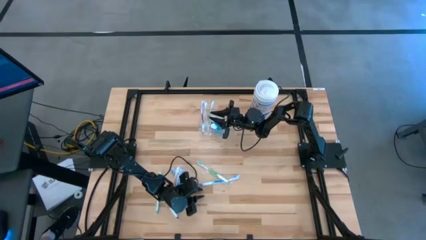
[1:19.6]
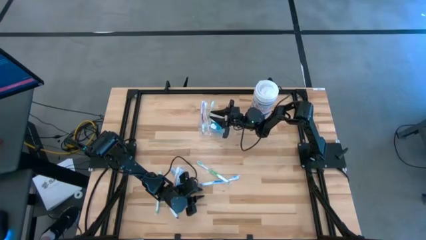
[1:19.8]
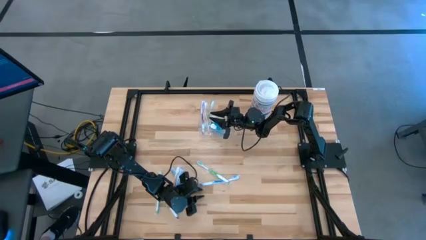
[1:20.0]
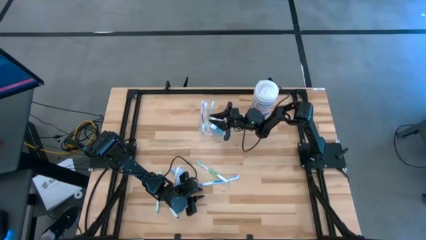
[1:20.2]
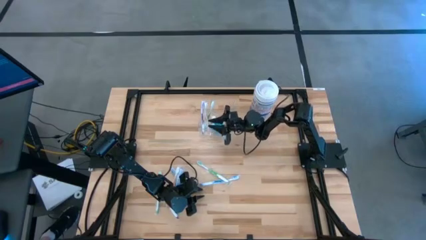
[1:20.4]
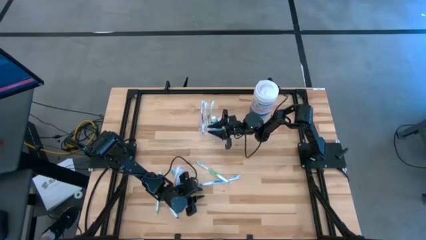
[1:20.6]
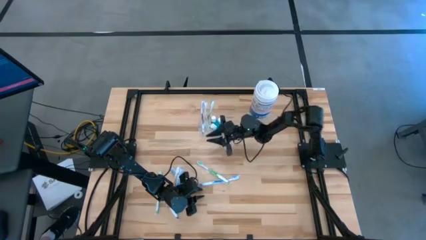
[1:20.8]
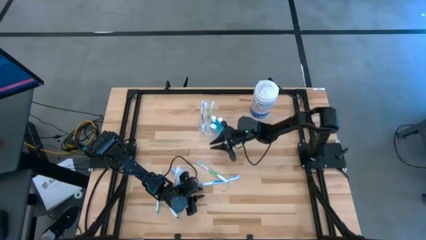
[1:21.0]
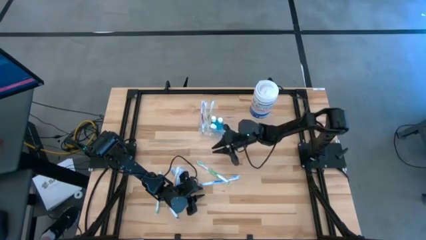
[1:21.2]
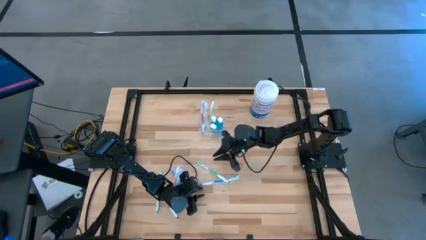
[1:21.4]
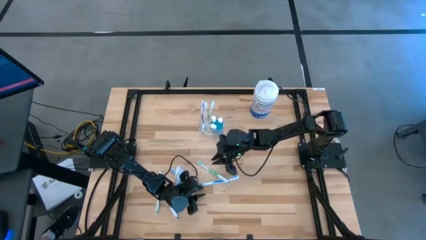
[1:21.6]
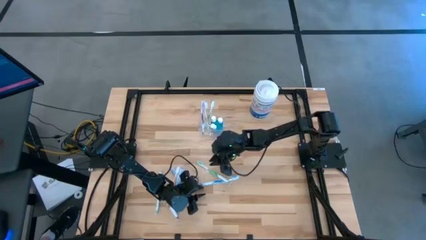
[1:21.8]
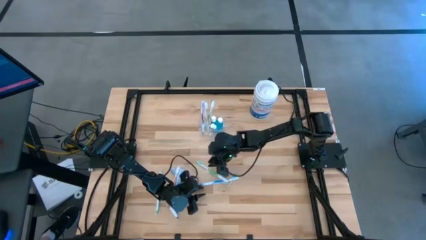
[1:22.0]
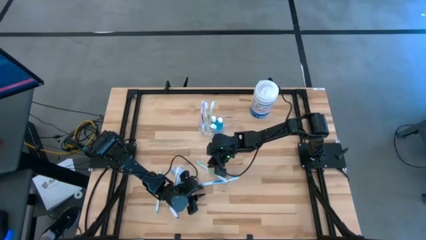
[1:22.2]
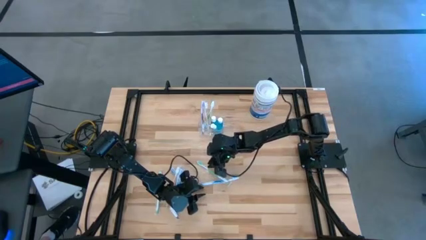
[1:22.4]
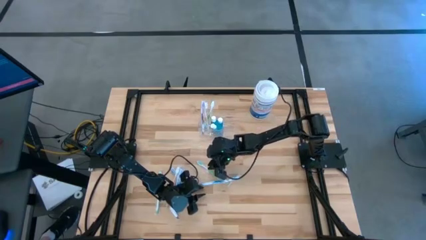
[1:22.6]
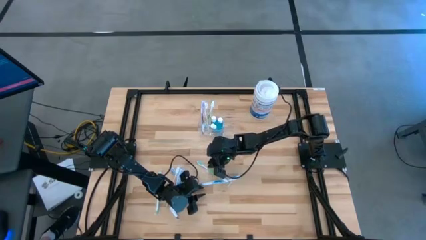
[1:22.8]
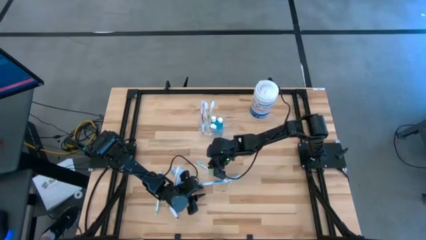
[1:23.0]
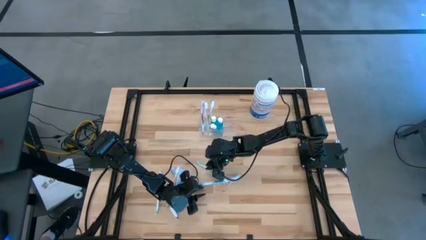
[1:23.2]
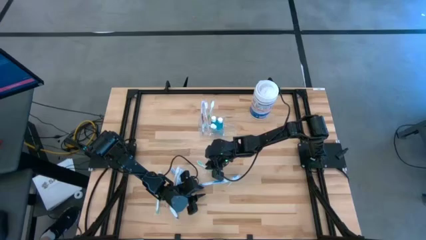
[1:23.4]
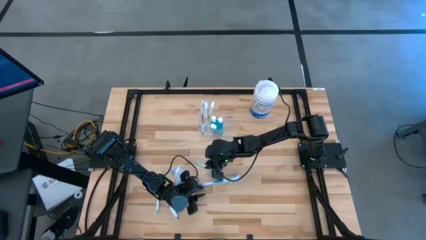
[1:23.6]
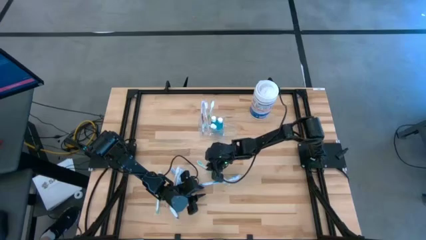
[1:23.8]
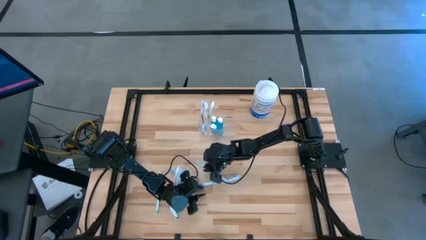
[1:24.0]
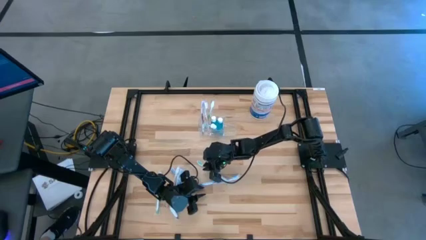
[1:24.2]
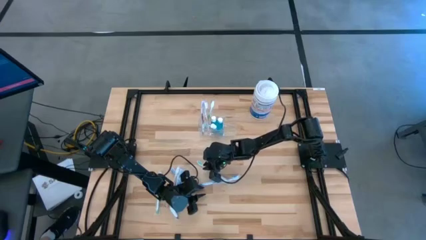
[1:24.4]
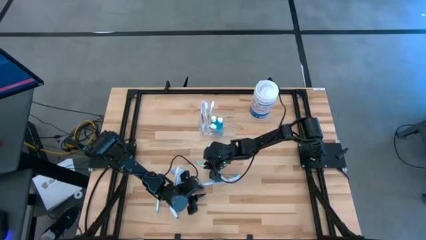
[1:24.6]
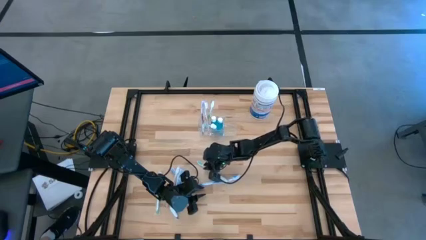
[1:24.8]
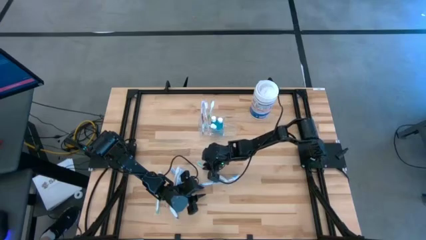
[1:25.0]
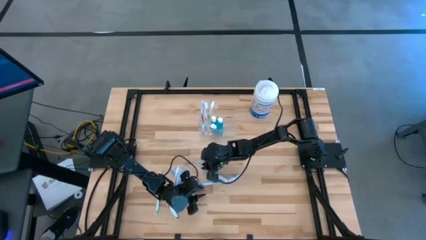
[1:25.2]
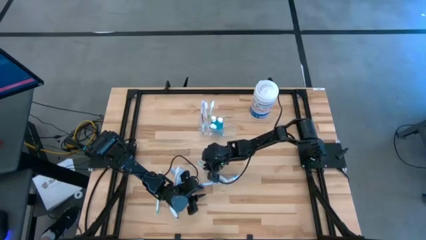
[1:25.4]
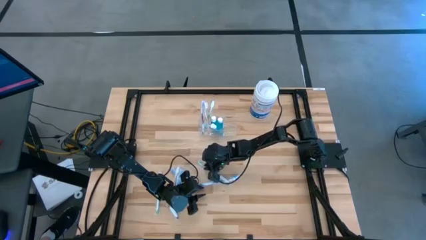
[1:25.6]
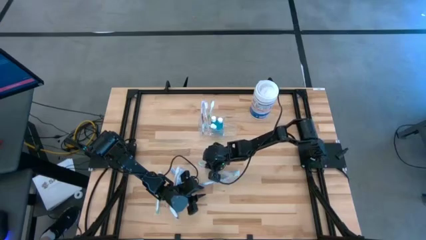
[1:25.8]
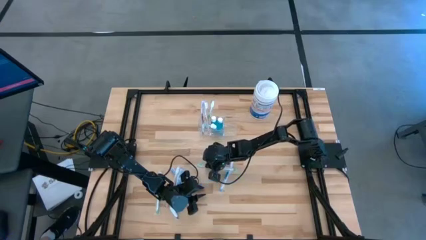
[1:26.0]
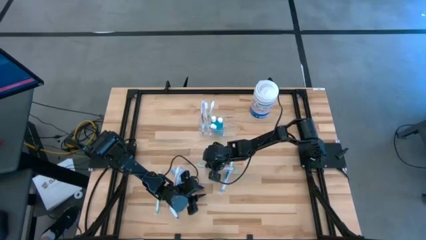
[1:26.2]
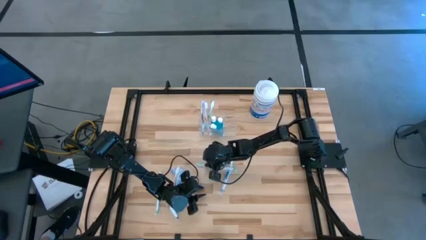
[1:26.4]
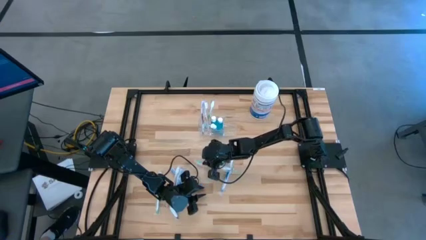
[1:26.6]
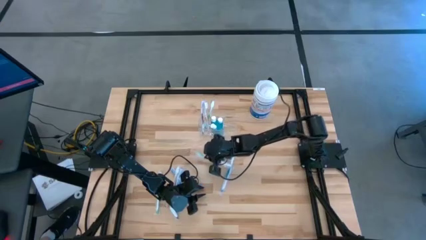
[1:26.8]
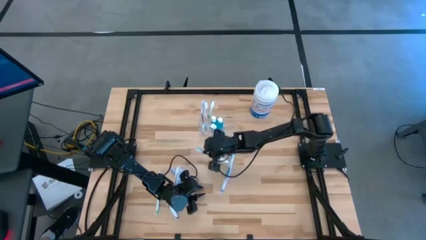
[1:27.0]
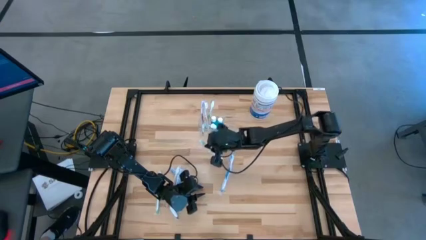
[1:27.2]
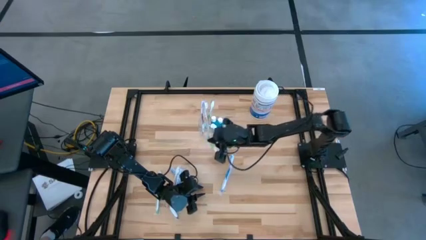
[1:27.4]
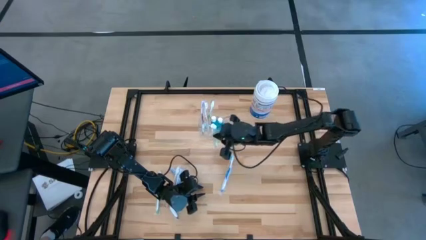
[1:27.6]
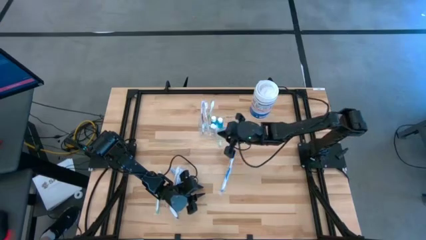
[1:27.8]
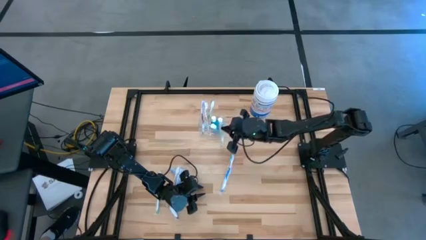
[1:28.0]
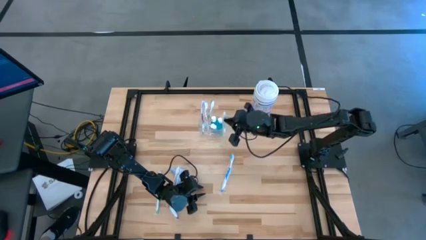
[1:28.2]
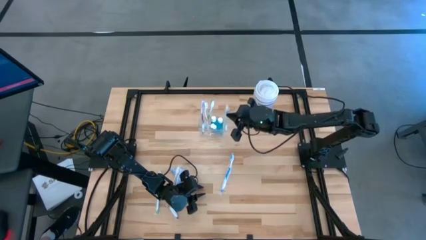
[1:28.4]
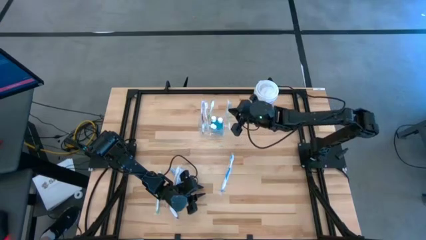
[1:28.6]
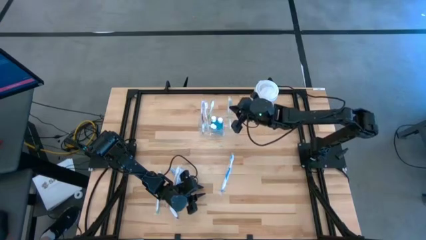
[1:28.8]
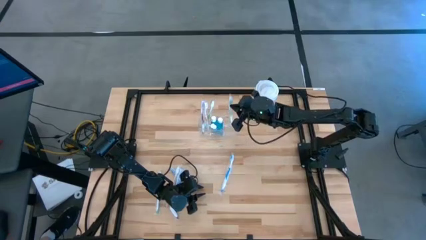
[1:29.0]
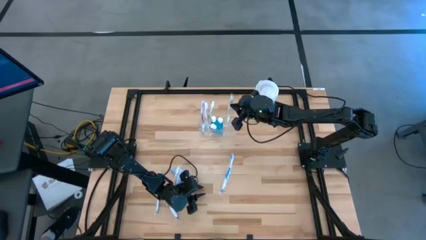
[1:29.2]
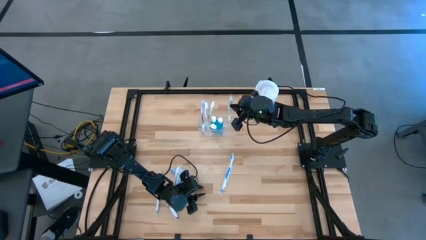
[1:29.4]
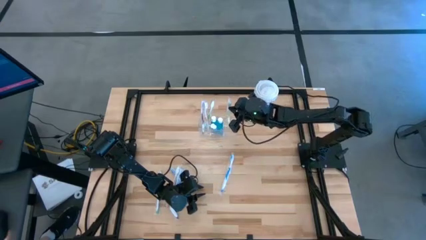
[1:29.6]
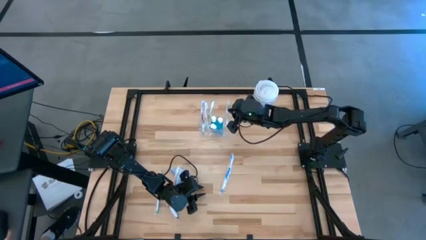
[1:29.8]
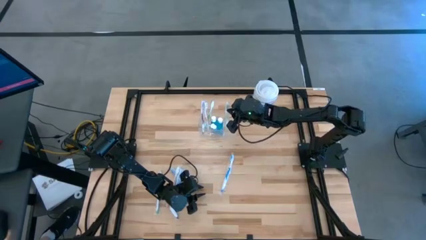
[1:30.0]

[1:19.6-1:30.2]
Task: Pick & Place toothbrushing station
Put the top green toothbrush into the transparent organizer

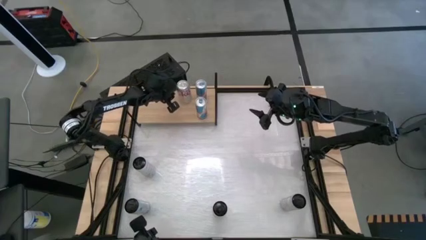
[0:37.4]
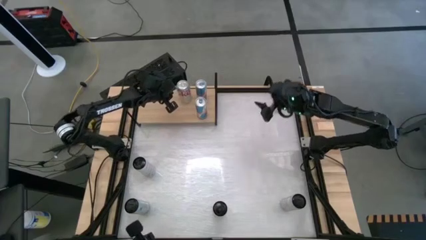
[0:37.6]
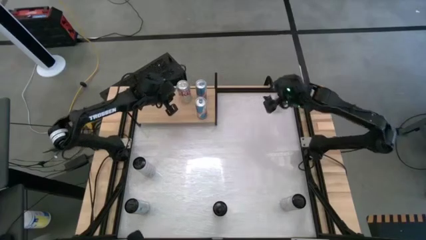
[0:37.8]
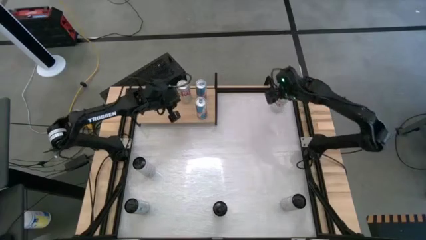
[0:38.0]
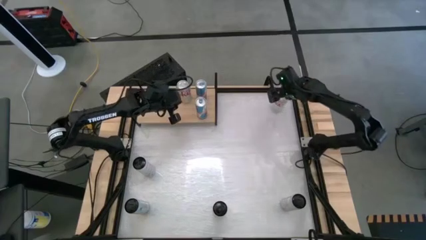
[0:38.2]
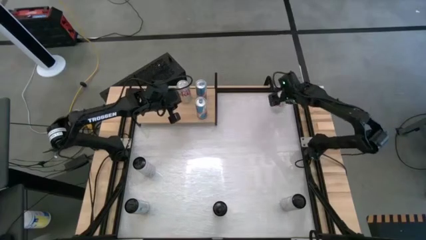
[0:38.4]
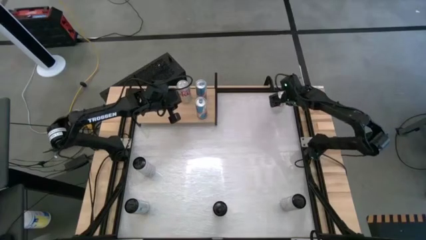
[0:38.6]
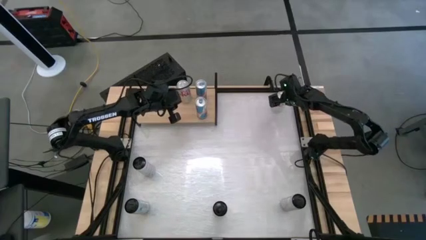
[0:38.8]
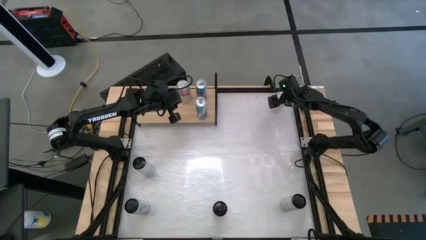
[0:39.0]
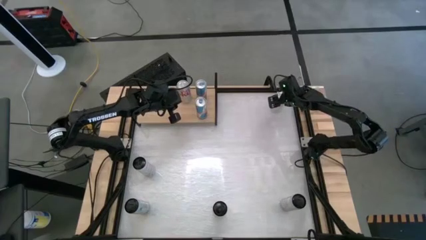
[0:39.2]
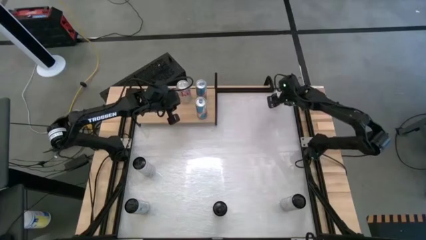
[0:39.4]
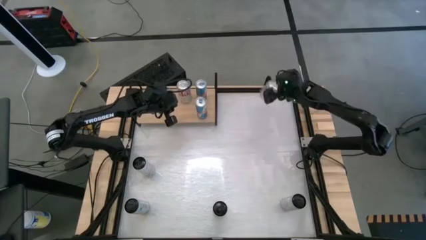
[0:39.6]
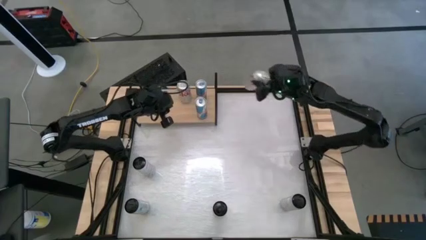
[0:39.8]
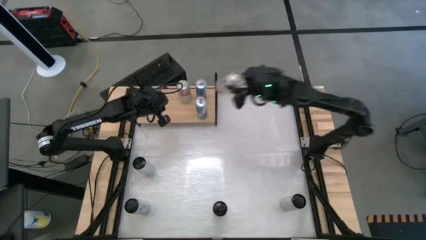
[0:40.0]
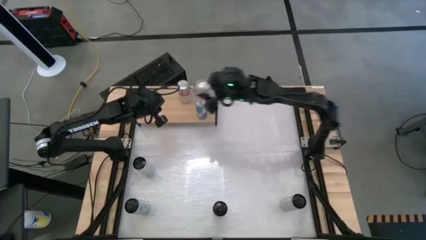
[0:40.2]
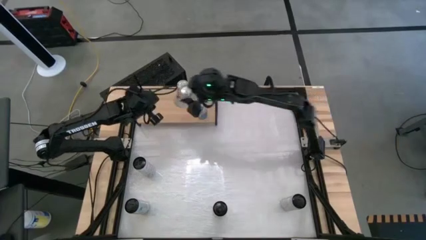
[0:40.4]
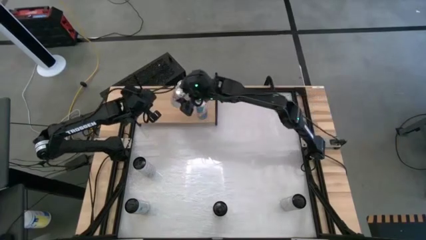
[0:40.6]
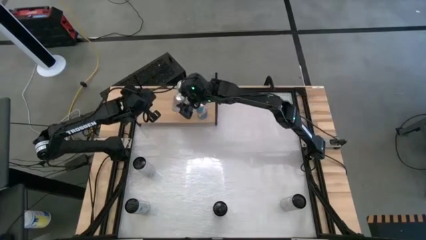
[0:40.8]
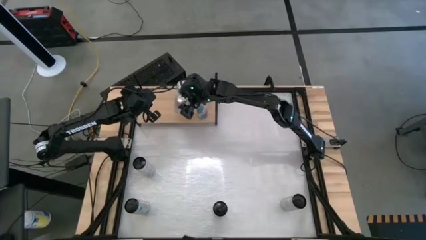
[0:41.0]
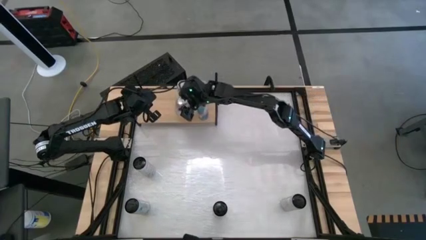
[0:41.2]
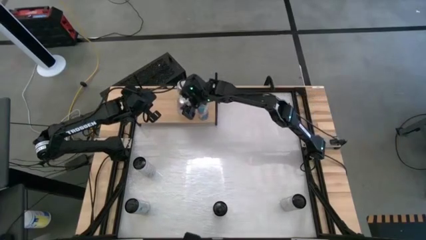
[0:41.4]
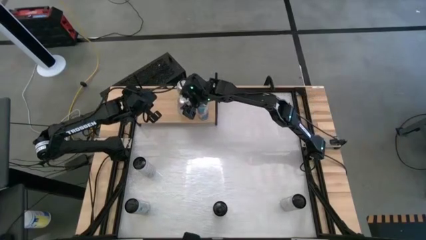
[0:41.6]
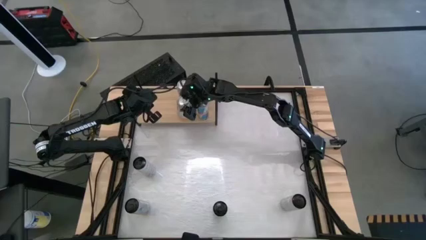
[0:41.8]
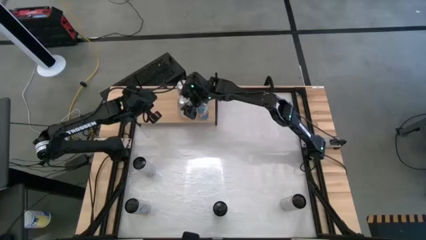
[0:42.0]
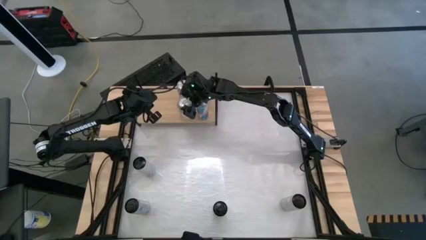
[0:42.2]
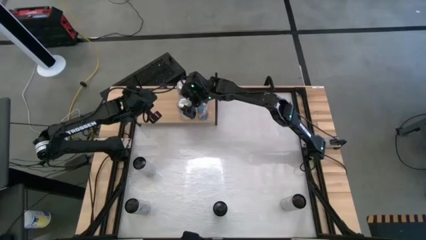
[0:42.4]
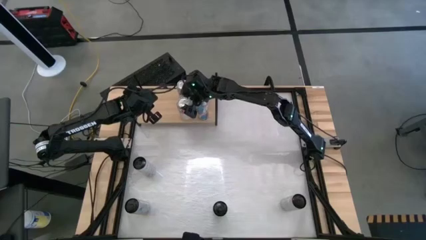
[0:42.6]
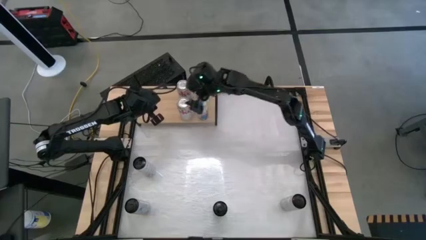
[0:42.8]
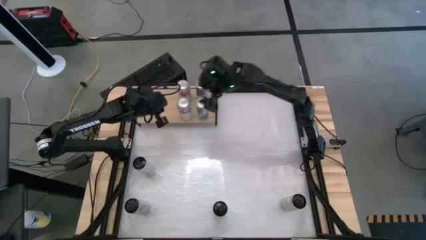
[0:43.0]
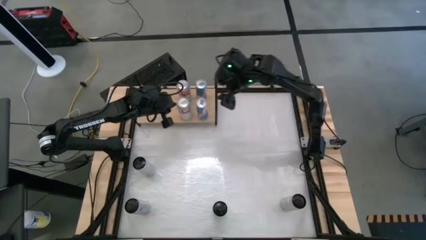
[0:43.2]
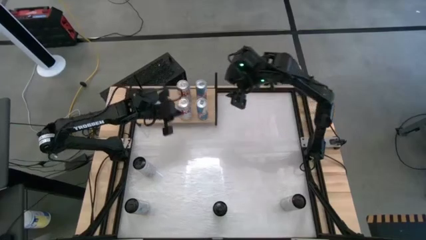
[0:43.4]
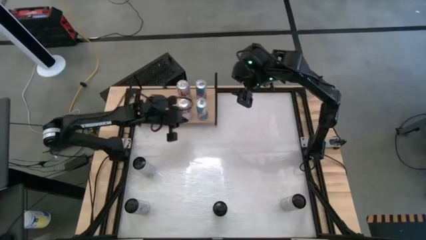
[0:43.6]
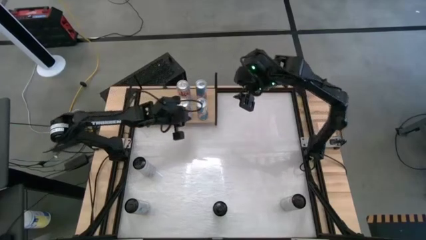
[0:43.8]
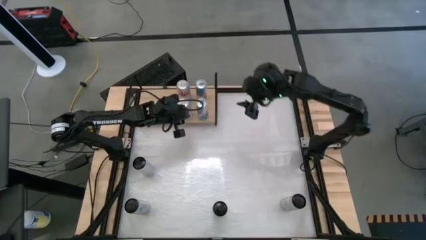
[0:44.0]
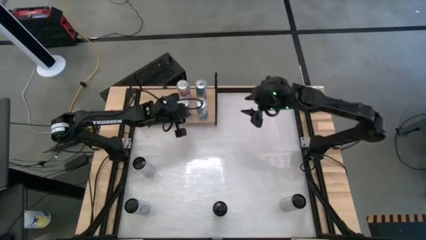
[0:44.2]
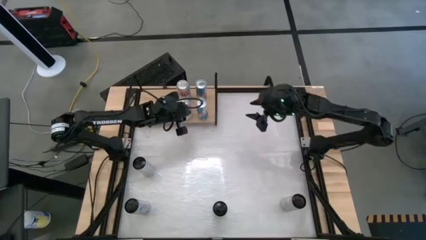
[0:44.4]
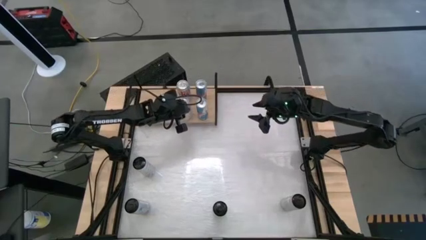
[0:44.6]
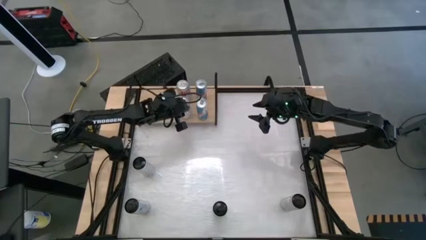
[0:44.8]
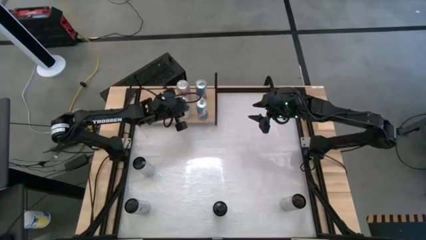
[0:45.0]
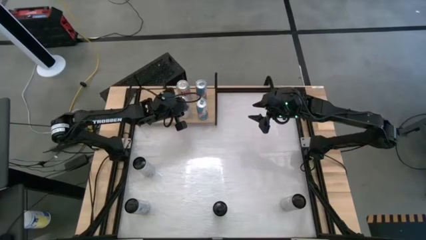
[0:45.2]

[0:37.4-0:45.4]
Task: Place canned beverage on shelf
Put the silver soda can on the shelf
